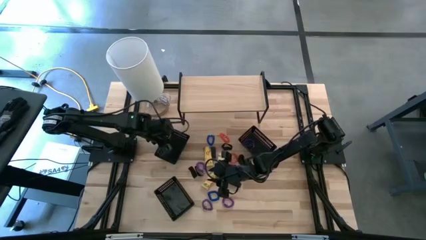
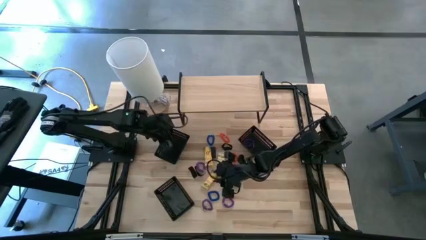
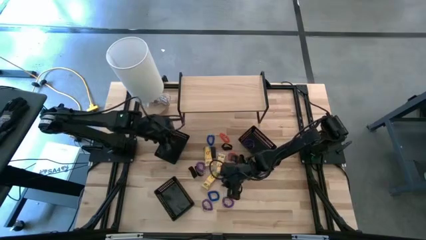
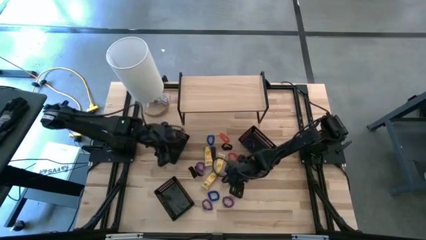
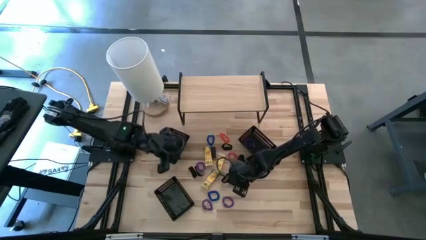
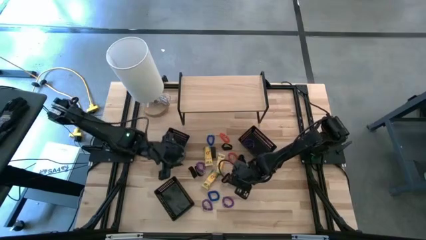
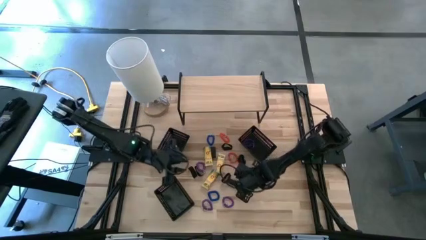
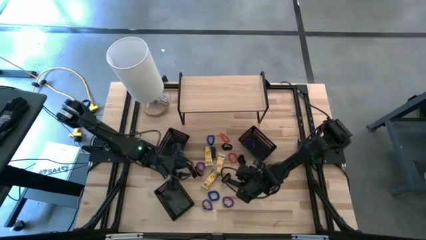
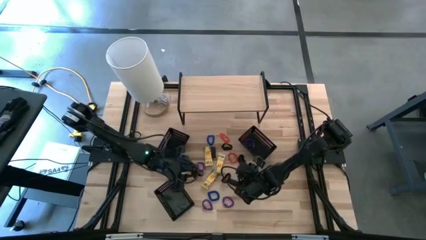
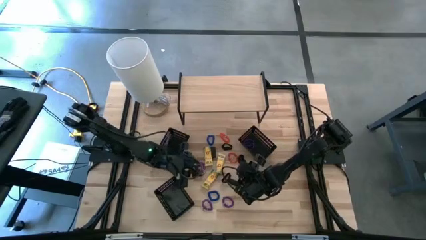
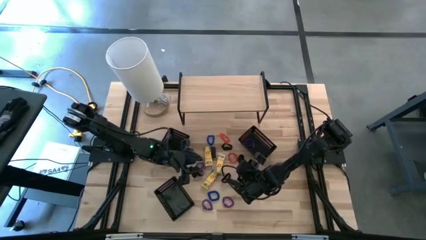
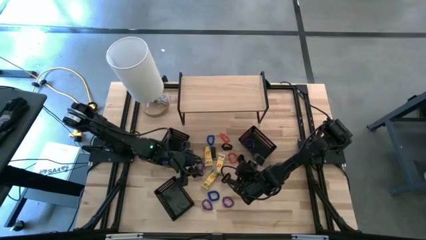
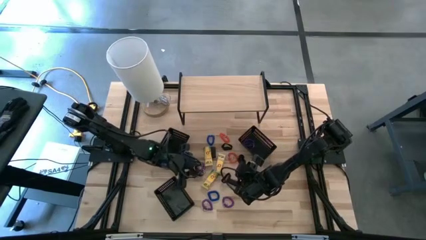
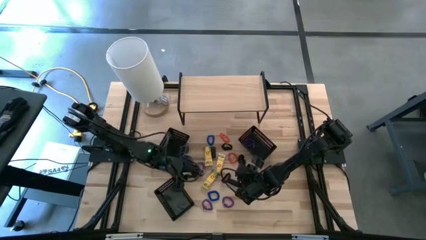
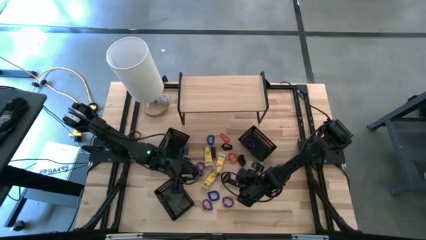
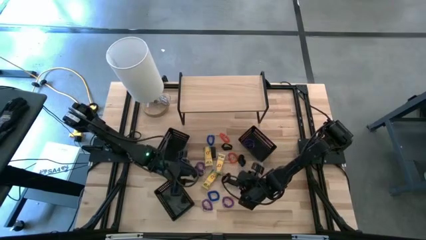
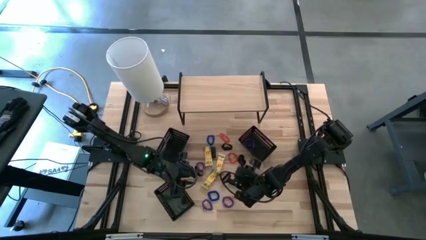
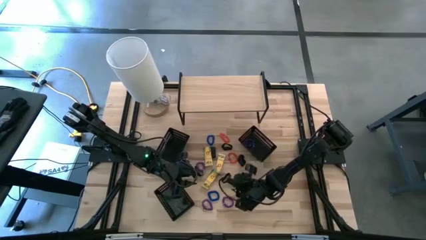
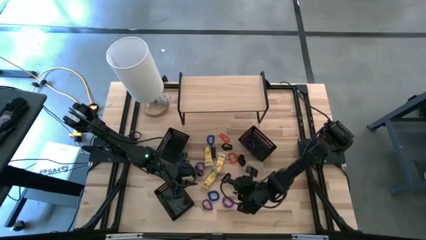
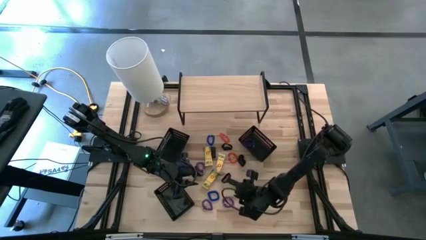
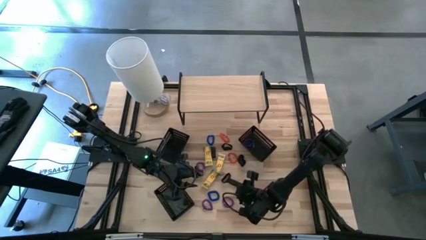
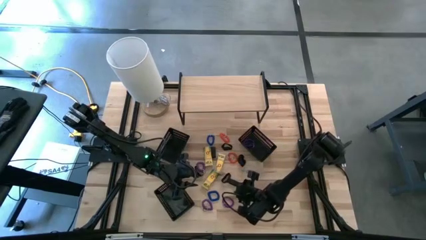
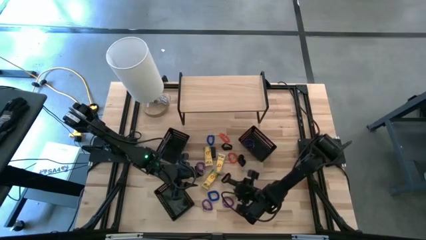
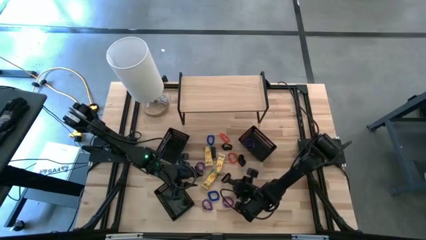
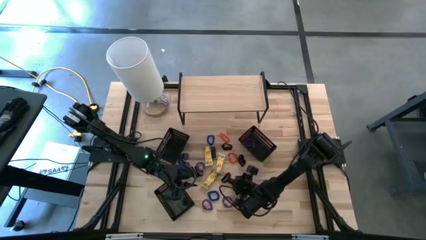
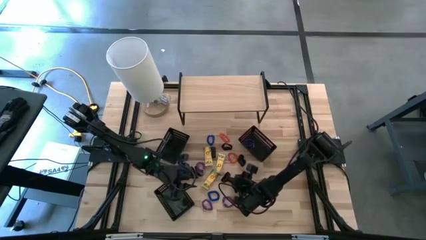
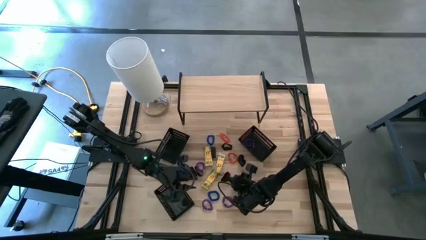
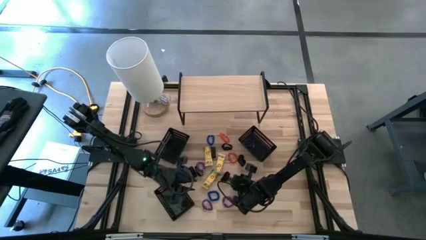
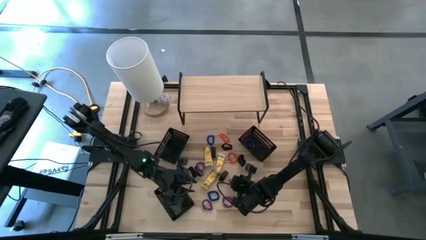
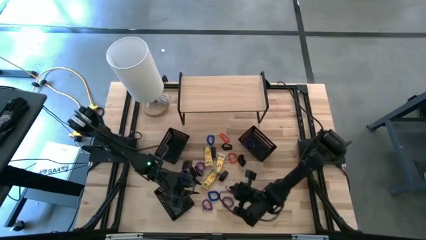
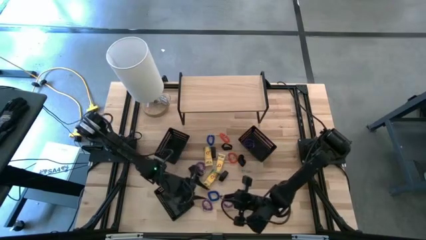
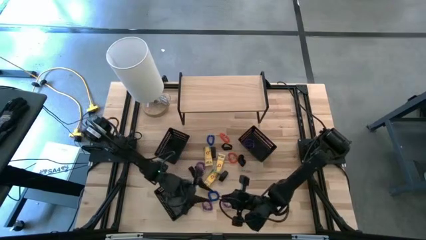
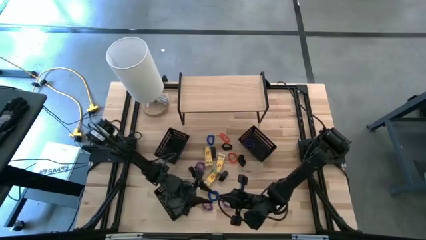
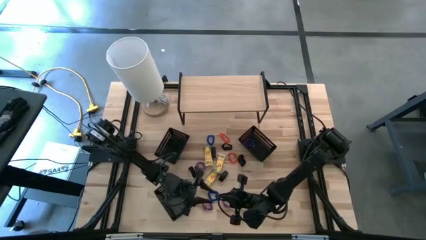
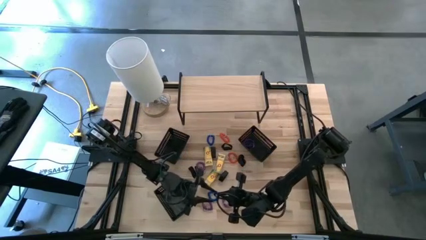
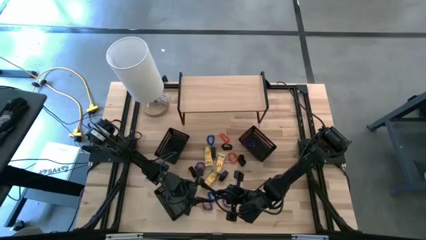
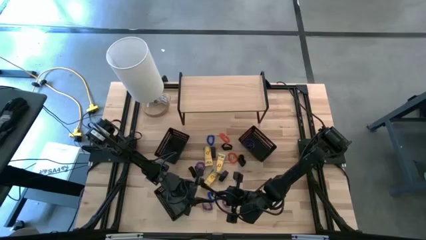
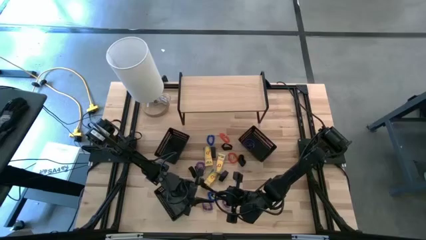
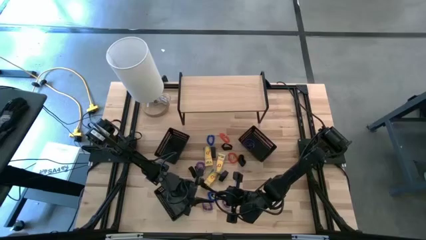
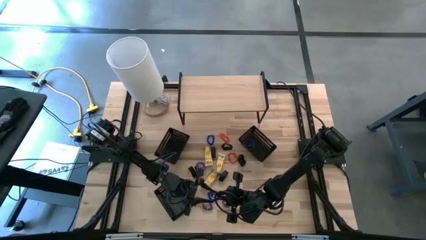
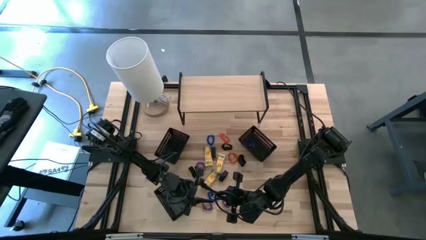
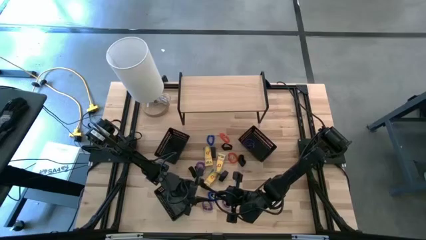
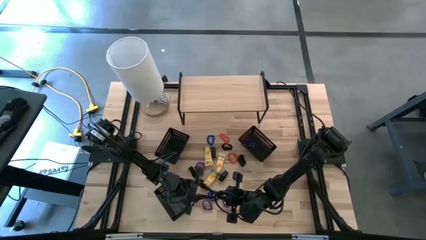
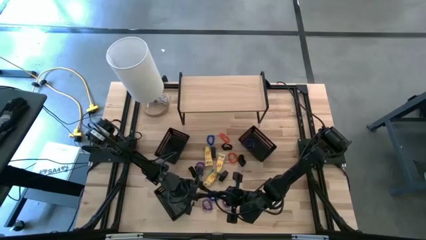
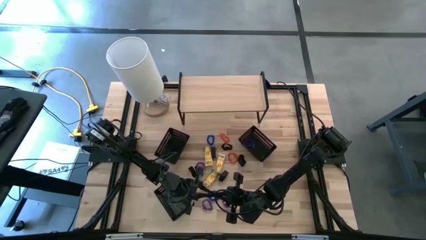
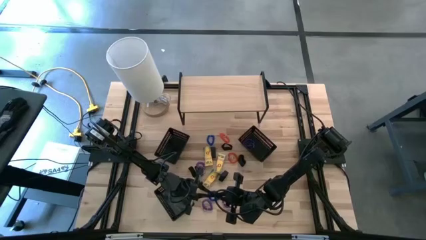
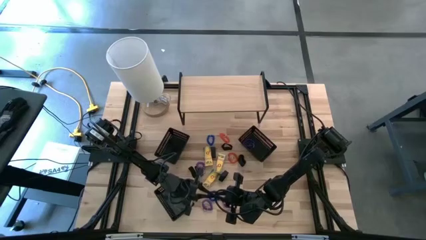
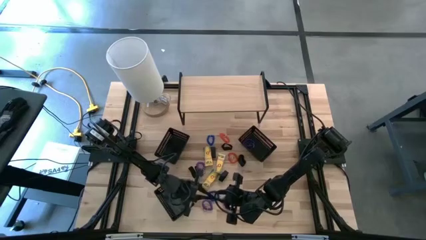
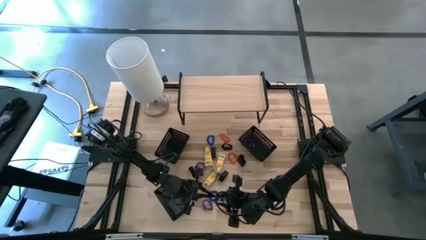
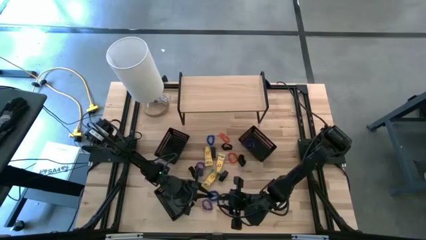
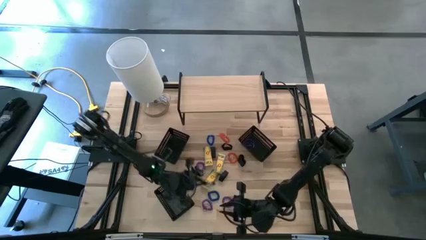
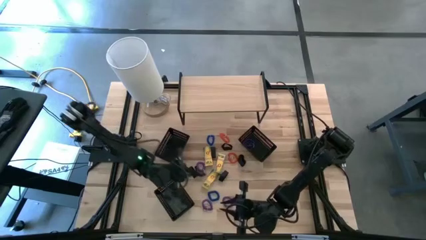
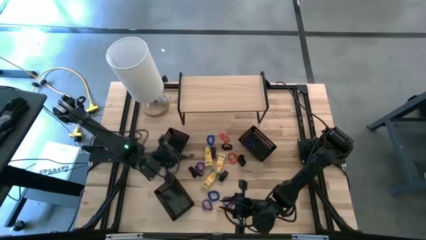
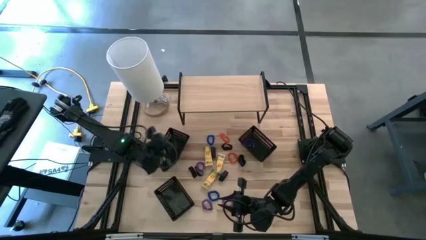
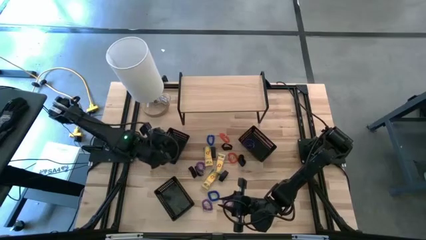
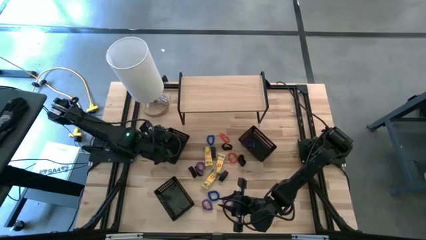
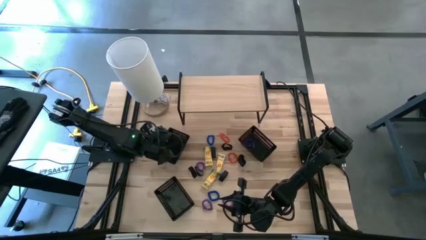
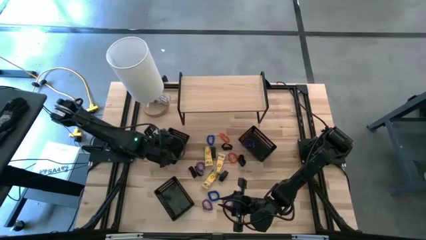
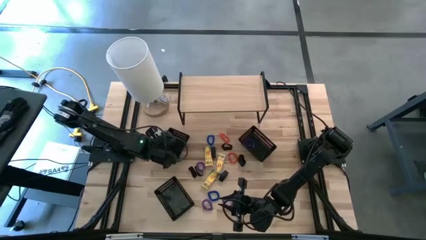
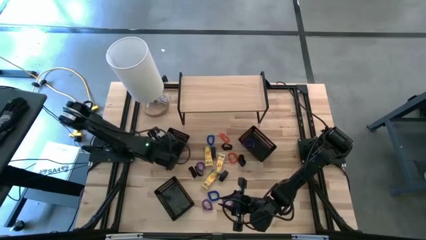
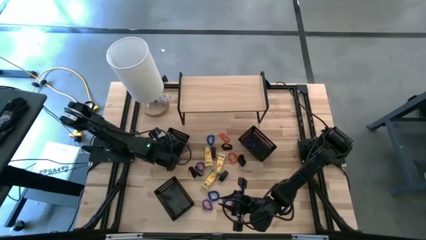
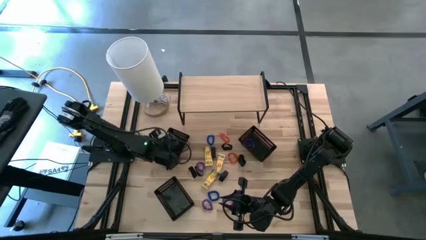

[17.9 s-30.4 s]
Task: Pick & Place Office Desk Supplies
Put the black rubber band into the top left black bin

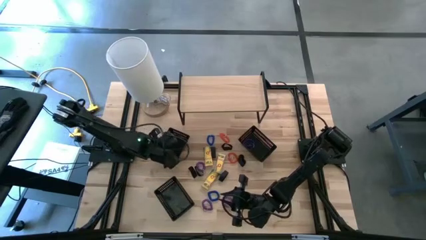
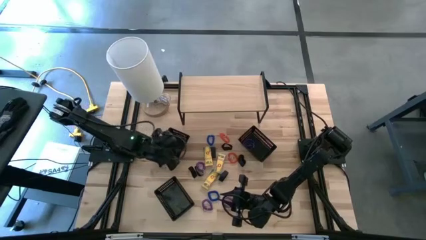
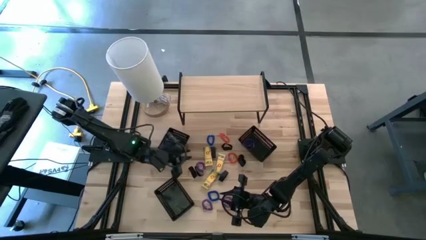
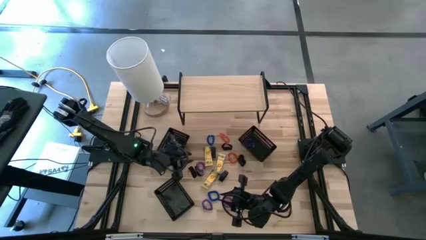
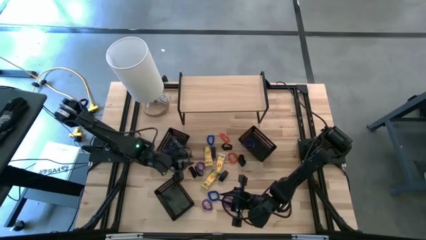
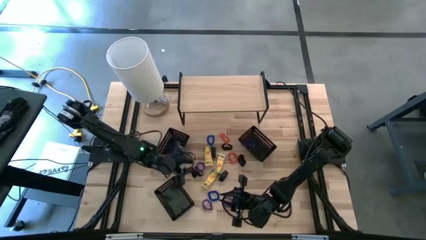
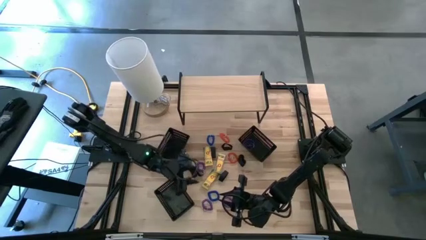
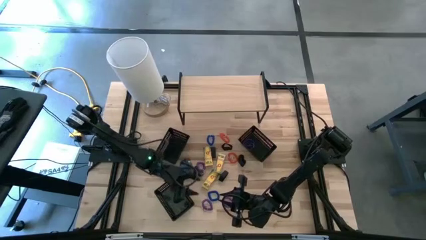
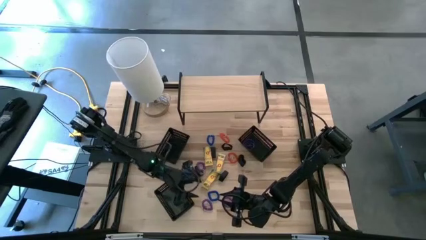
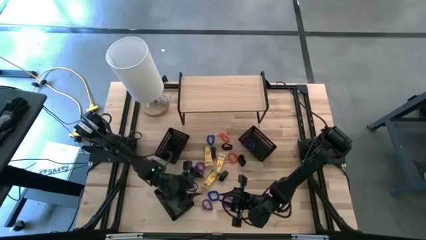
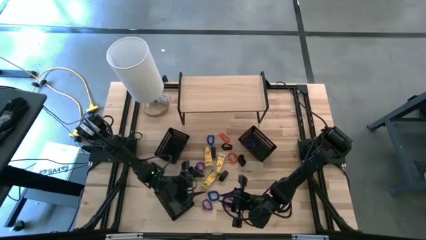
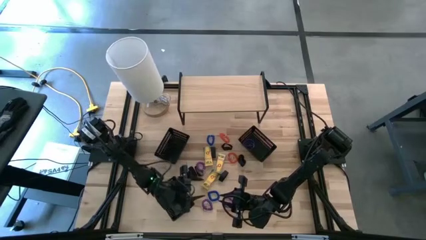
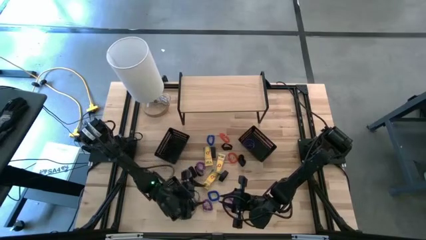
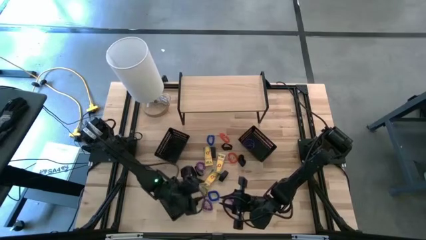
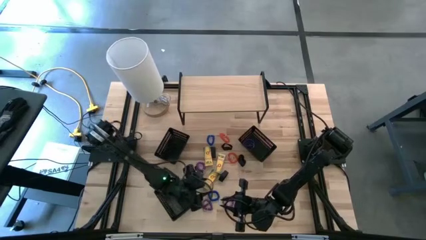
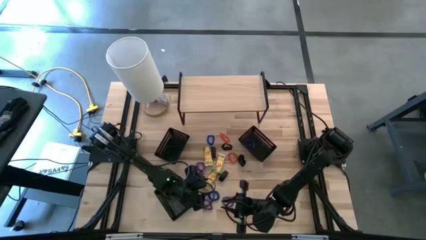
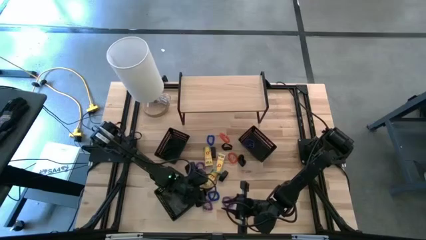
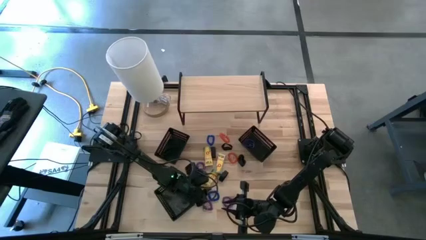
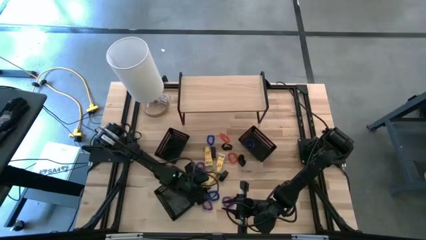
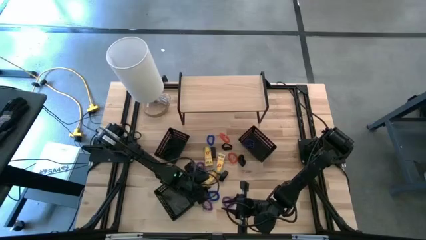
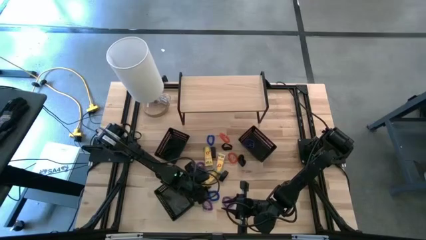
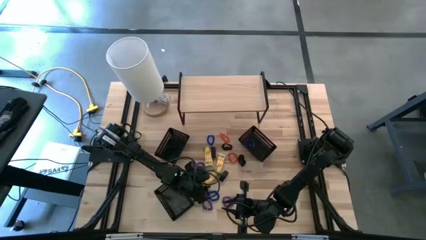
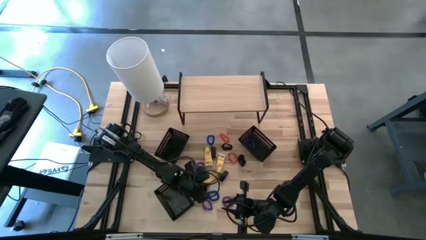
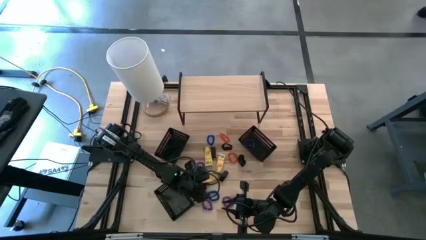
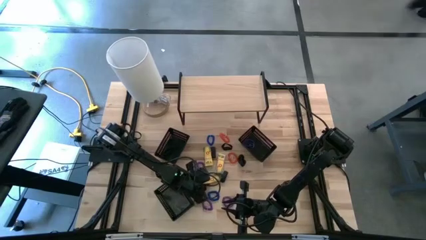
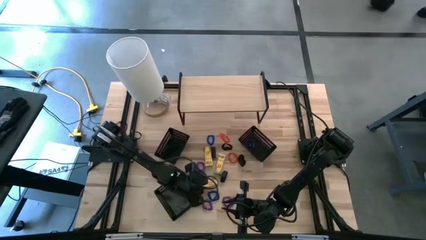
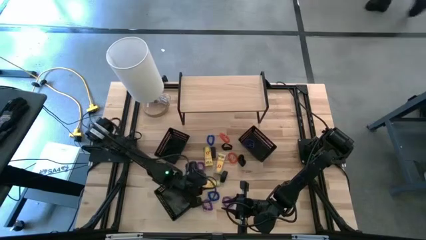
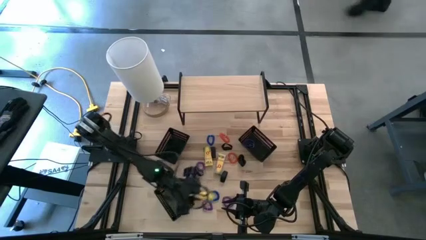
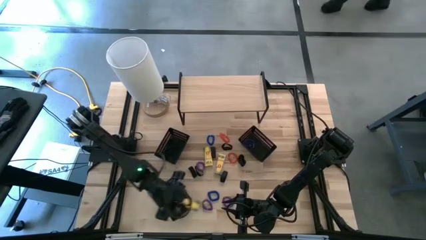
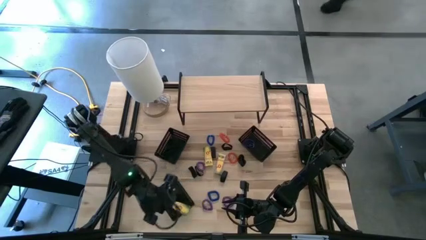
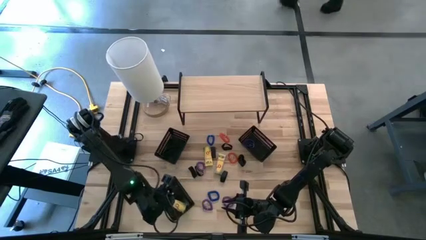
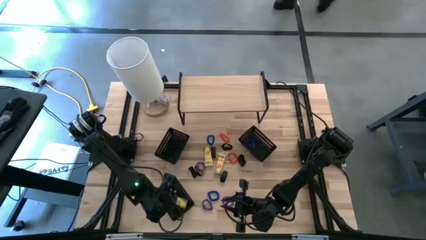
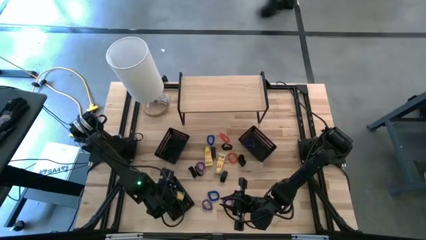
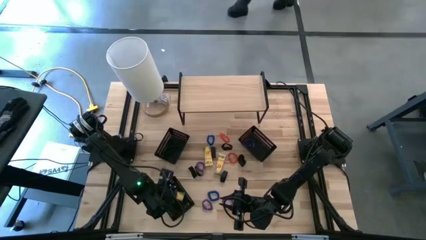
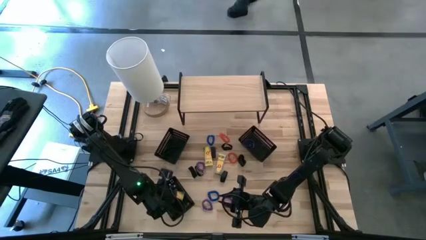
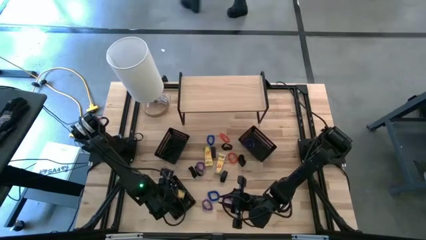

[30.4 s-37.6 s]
Put the bottom crayon box into the bottom black bin
